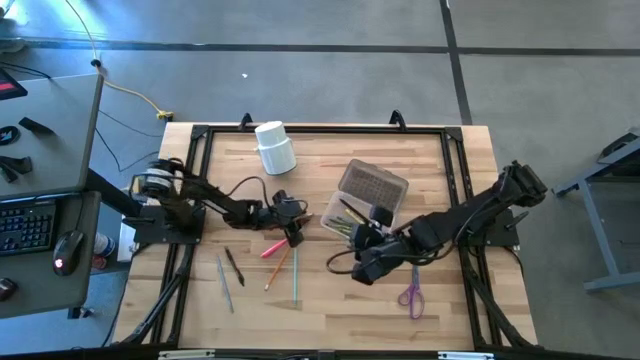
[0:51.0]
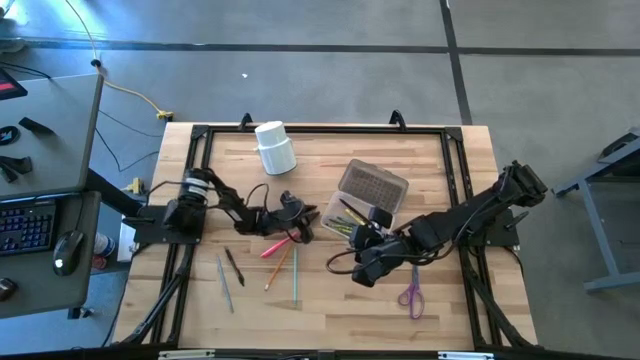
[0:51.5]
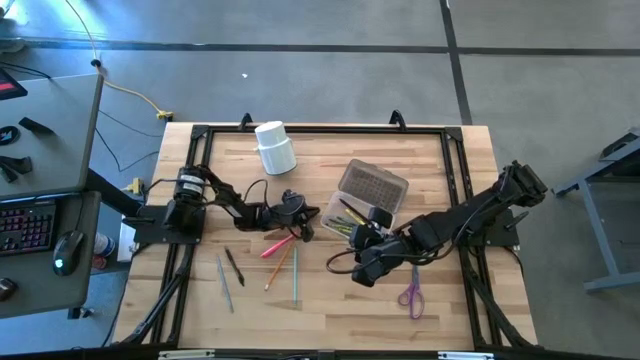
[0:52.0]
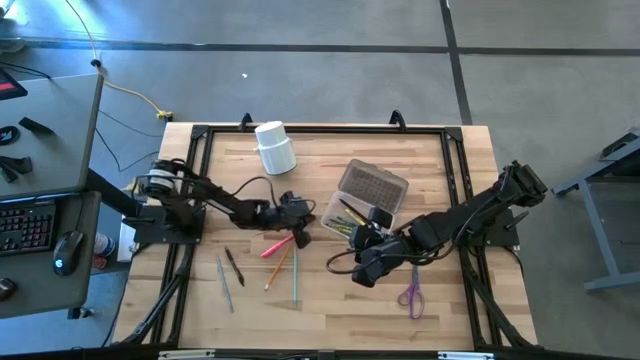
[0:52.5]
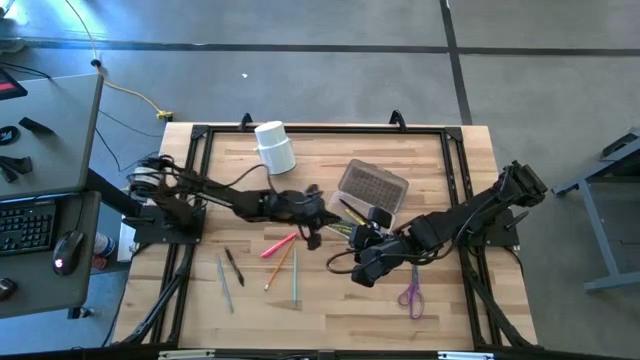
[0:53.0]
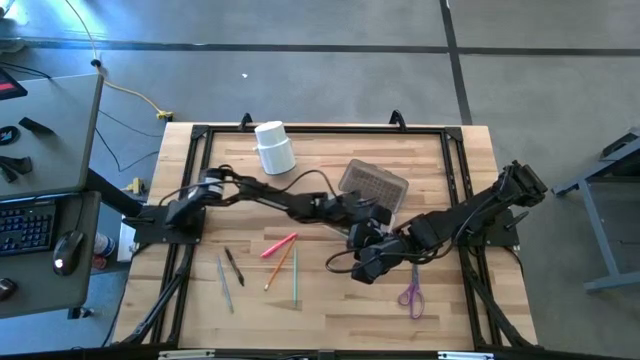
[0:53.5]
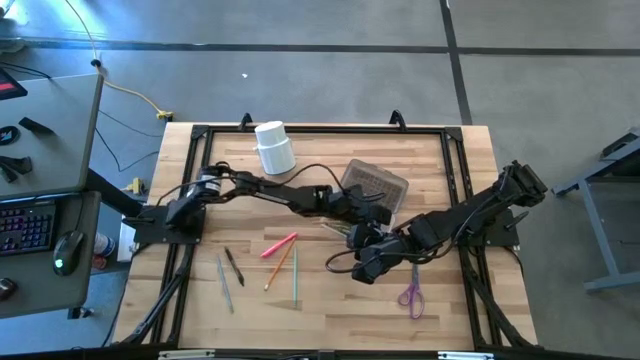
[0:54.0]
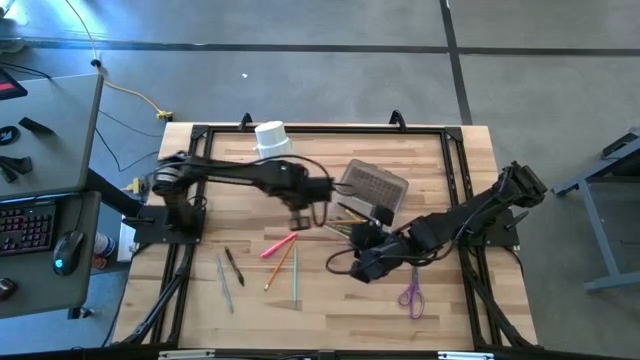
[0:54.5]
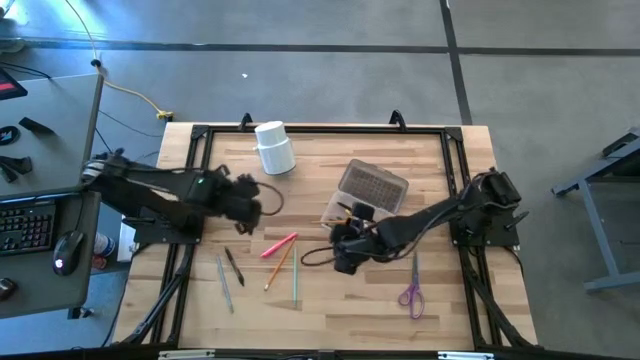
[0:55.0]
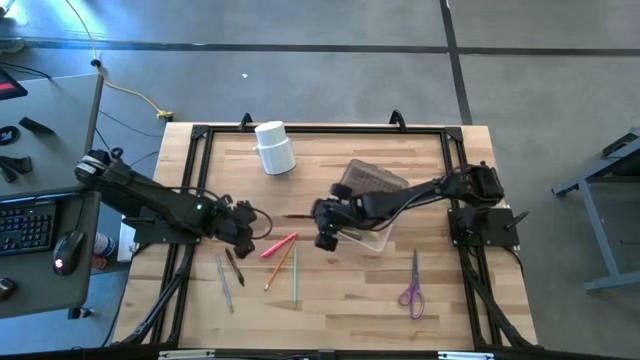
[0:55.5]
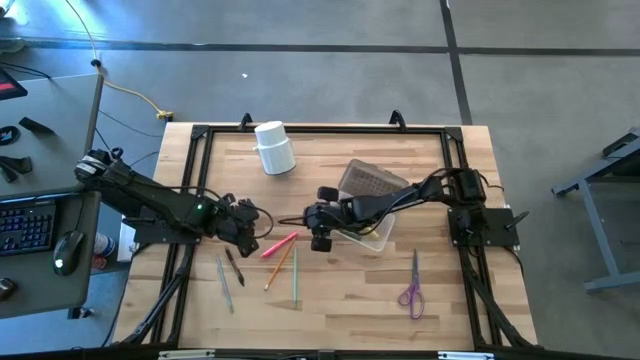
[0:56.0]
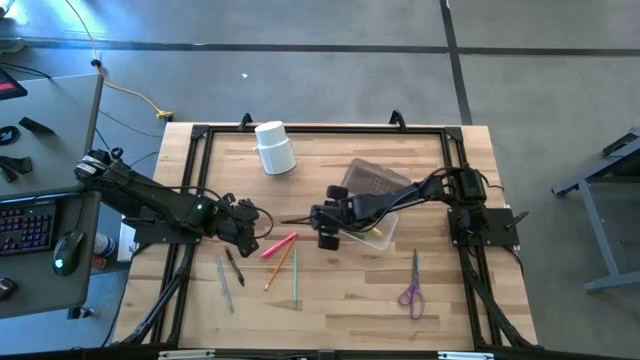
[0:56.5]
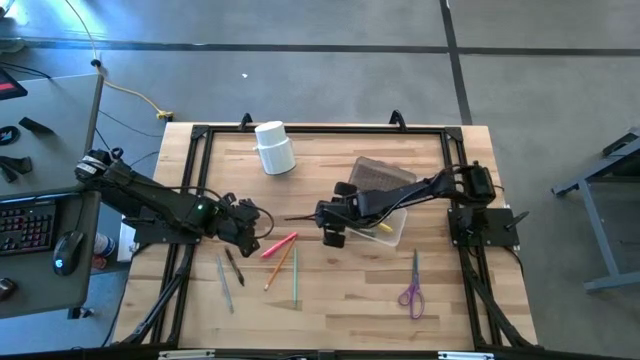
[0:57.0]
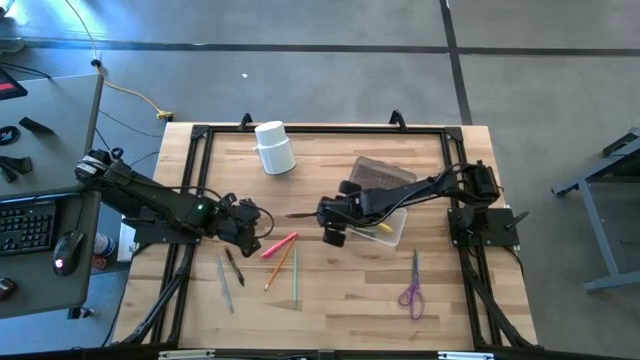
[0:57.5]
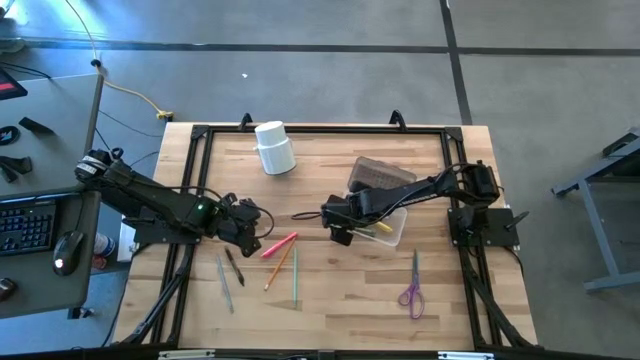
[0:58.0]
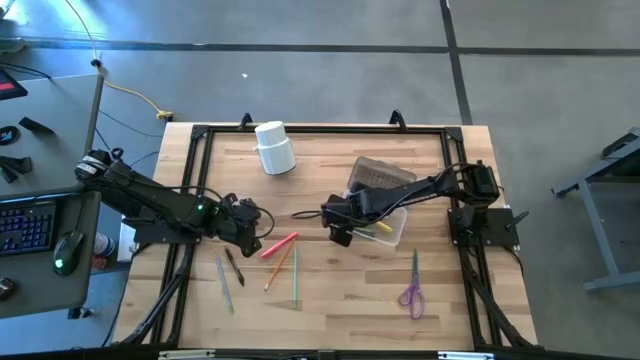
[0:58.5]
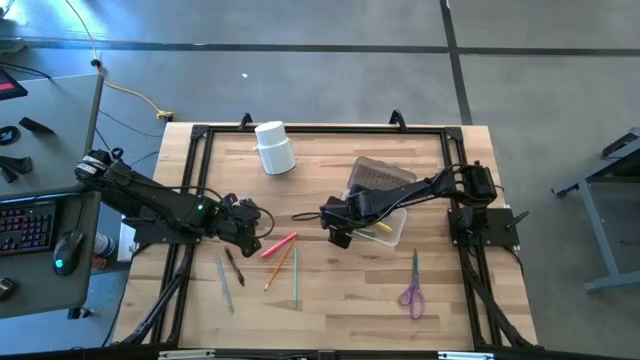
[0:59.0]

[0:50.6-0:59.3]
Task: Pick & place school supplies into a supply box
Put the top orange pencil into the supply box

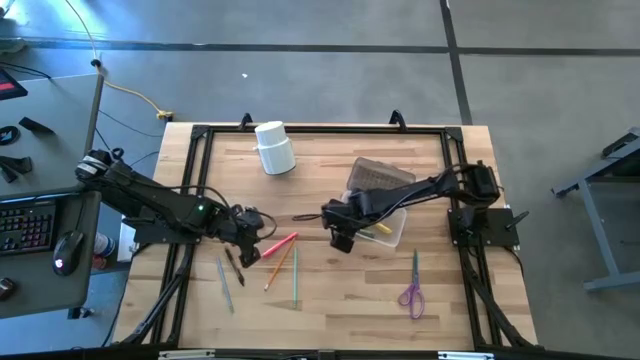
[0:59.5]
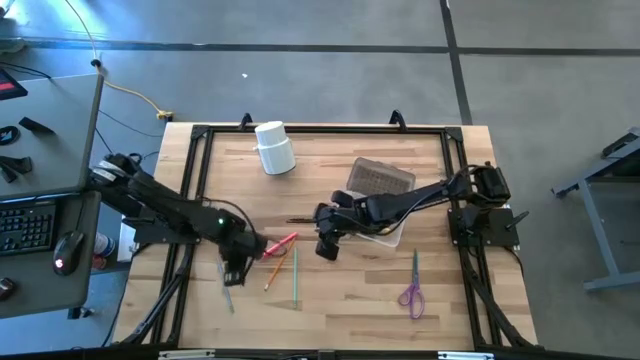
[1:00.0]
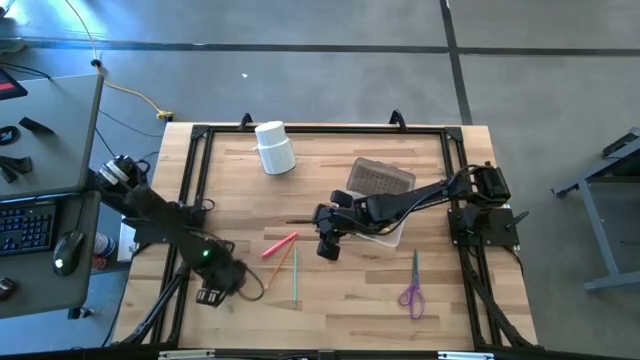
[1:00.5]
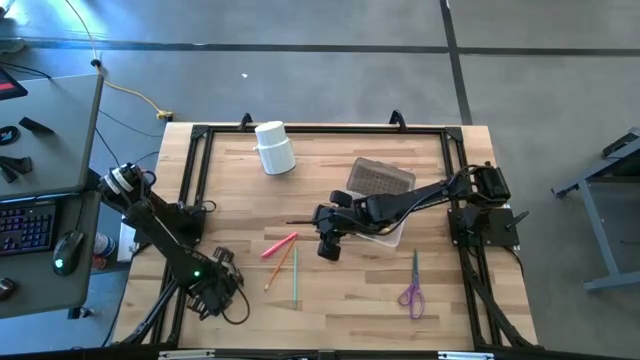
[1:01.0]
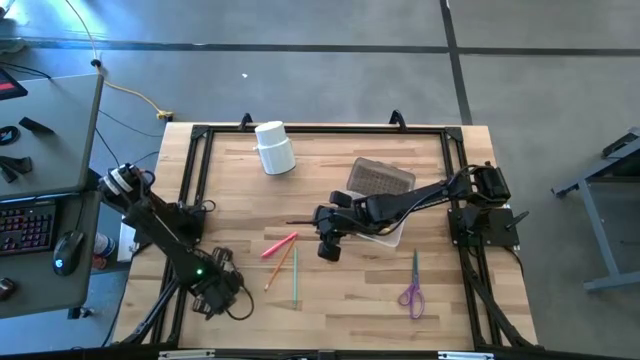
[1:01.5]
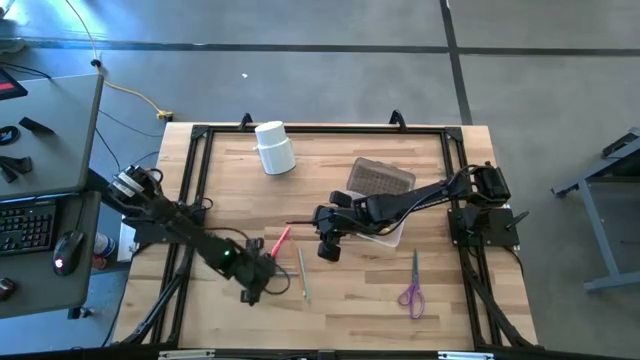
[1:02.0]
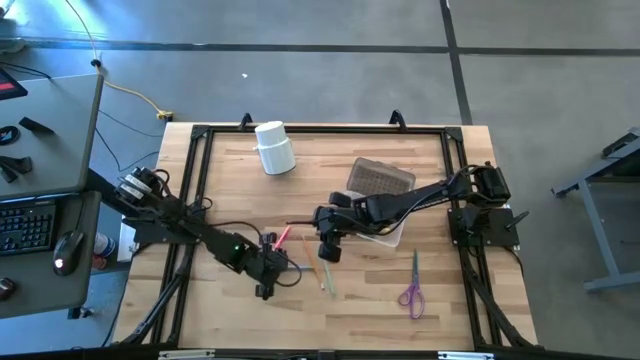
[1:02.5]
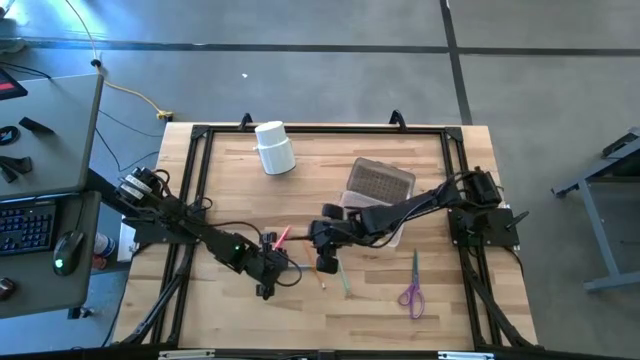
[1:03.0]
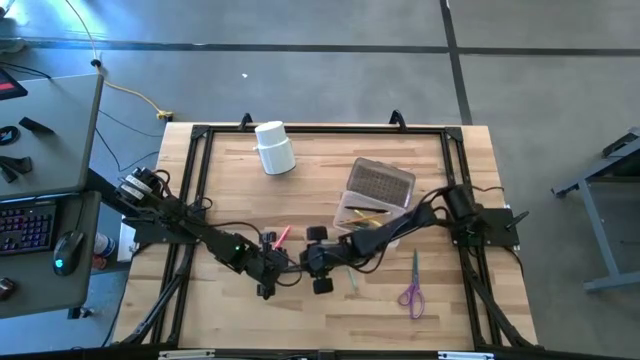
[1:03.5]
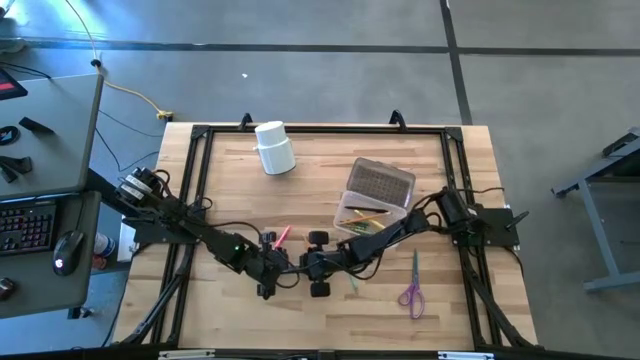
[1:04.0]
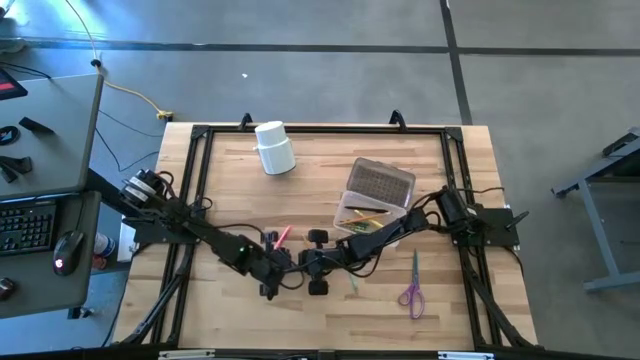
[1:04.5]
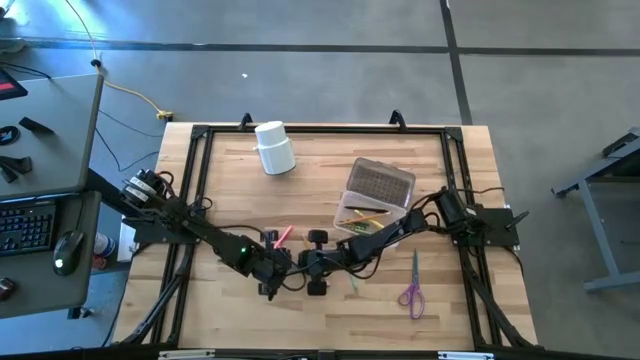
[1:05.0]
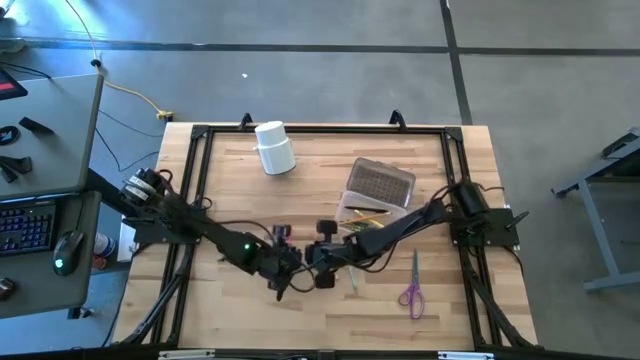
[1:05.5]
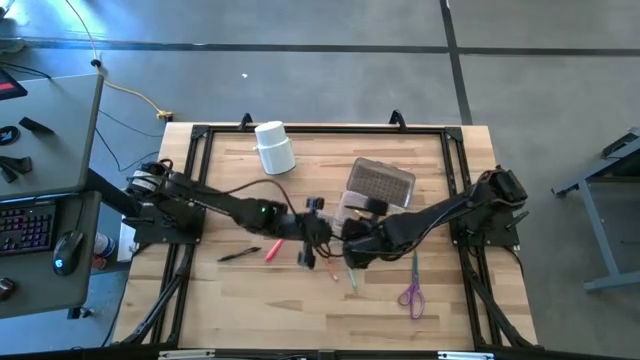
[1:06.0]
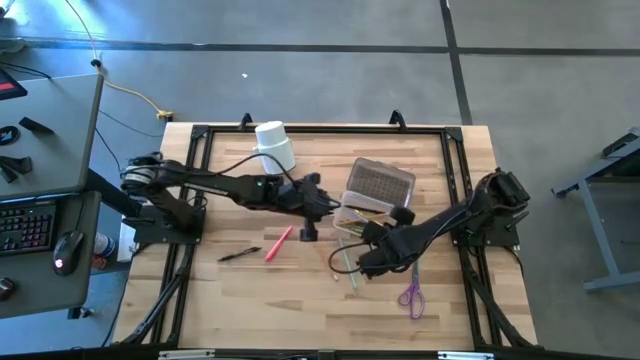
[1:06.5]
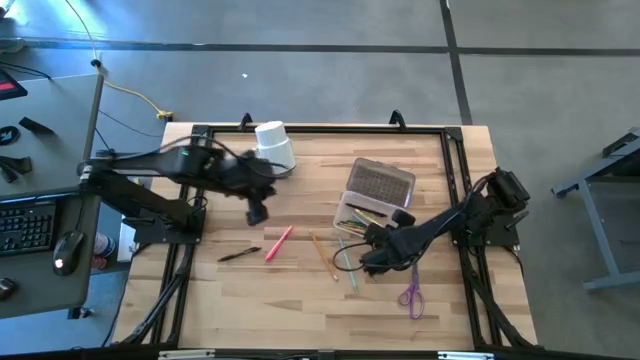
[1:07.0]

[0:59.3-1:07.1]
Put the blue pencil into the supply box

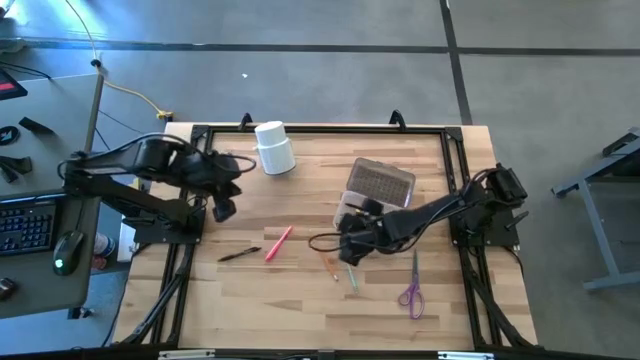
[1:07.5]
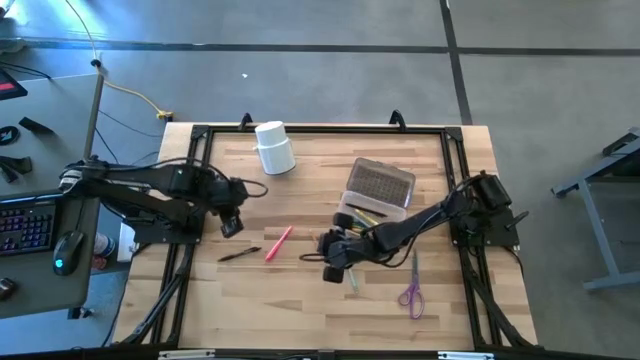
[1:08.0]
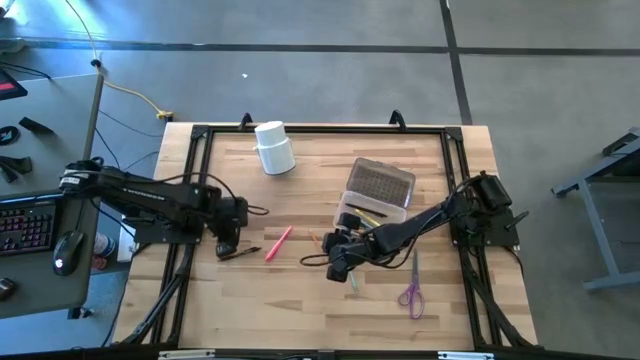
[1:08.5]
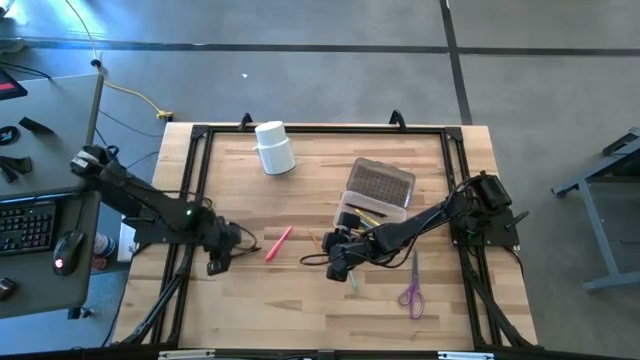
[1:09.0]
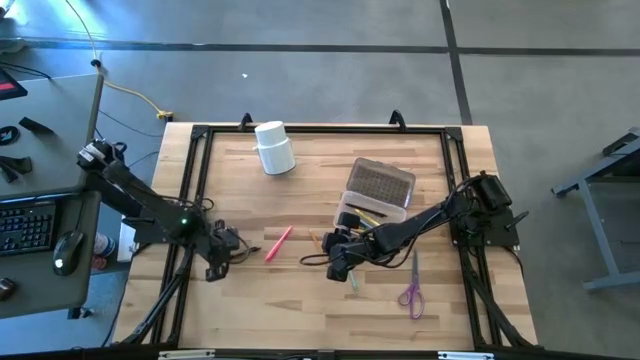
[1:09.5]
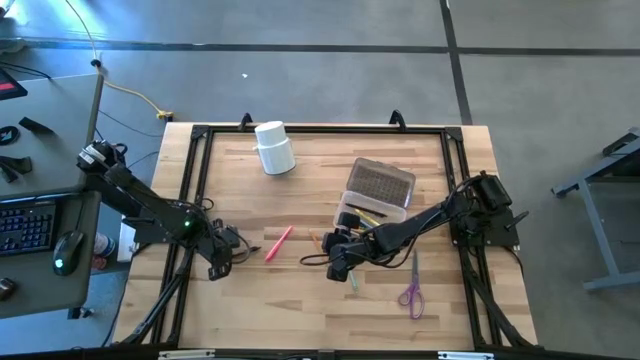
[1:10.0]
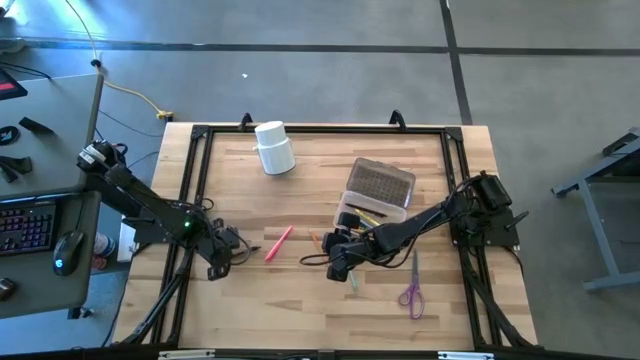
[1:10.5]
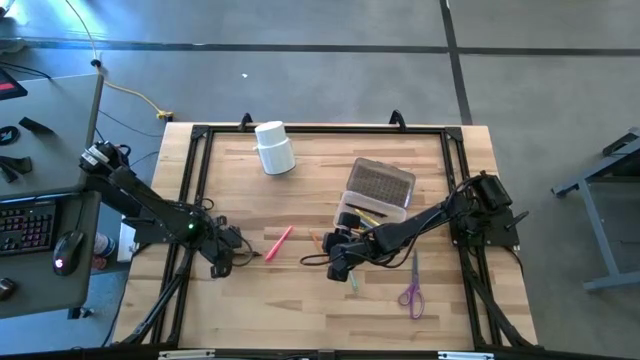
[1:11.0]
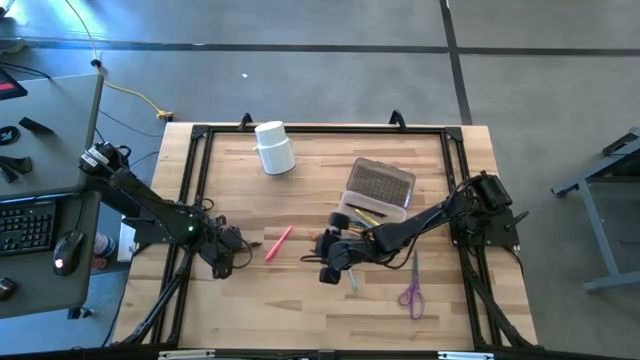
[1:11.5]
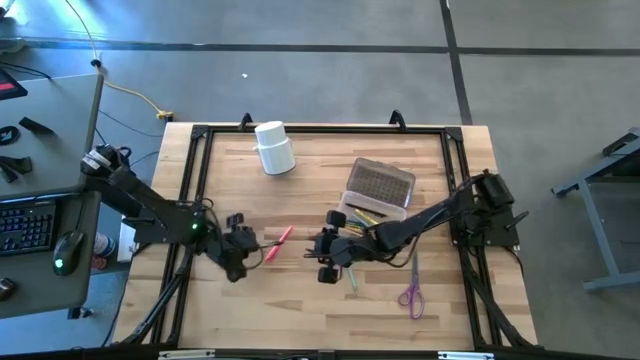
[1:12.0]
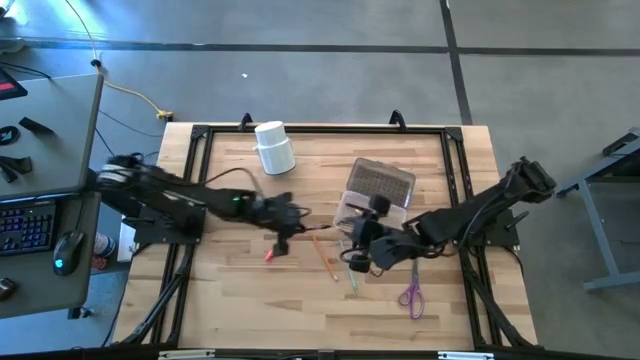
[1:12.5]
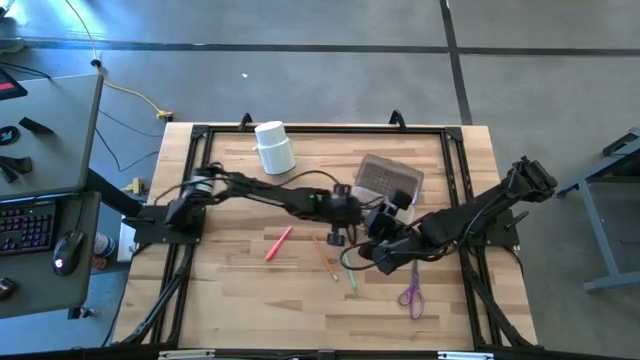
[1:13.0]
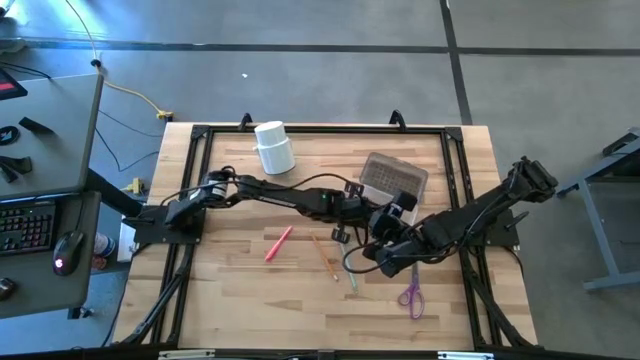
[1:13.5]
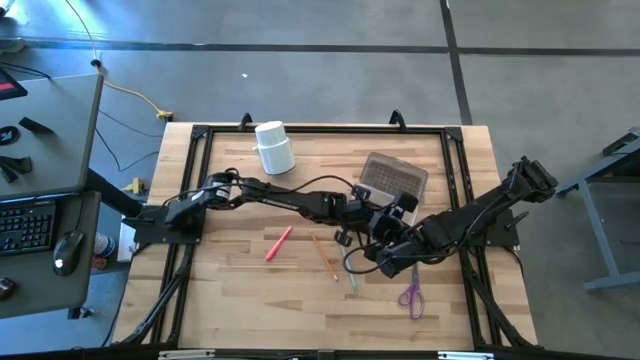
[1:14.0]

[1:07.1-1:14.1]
Put the black pen into the supply box
